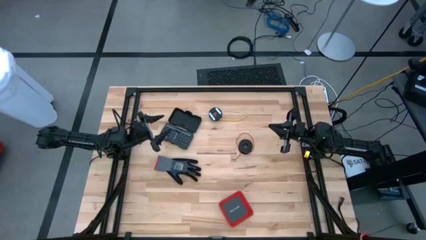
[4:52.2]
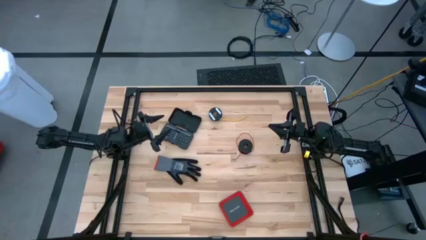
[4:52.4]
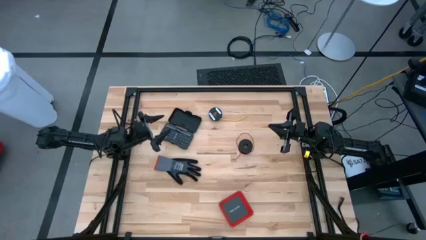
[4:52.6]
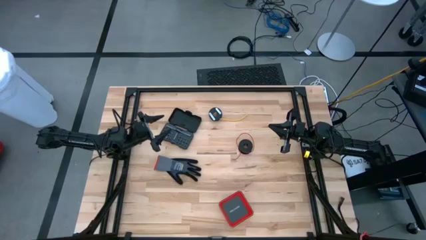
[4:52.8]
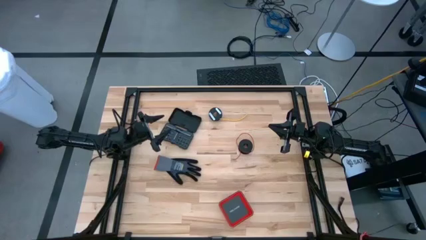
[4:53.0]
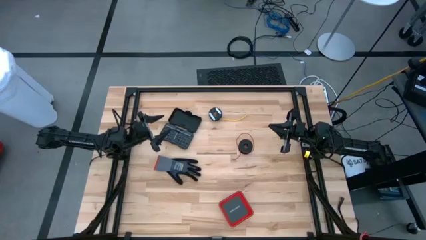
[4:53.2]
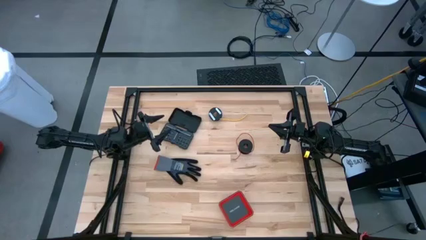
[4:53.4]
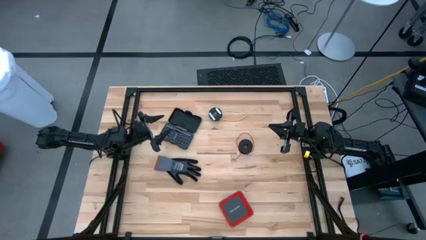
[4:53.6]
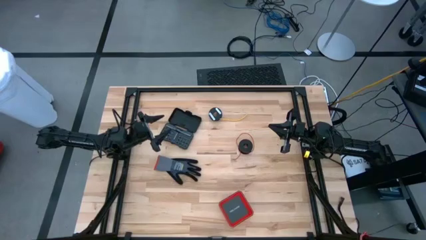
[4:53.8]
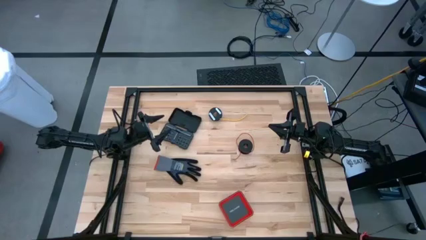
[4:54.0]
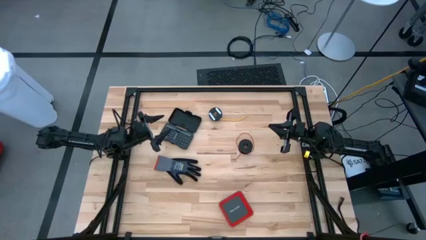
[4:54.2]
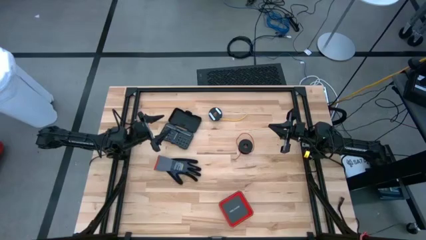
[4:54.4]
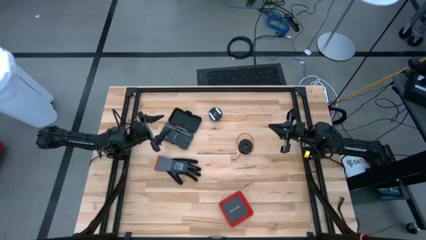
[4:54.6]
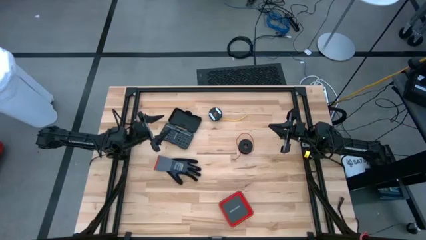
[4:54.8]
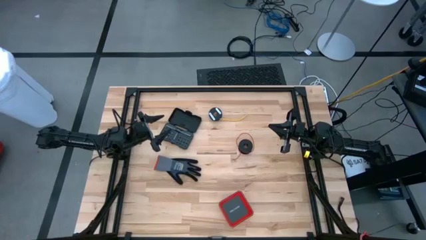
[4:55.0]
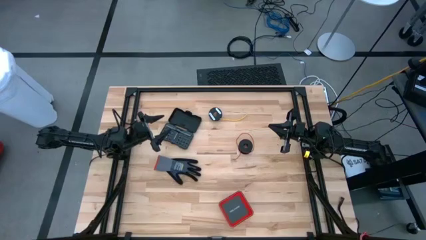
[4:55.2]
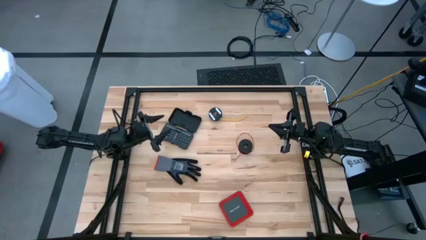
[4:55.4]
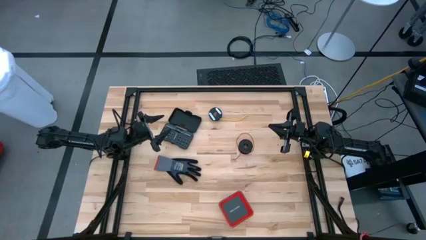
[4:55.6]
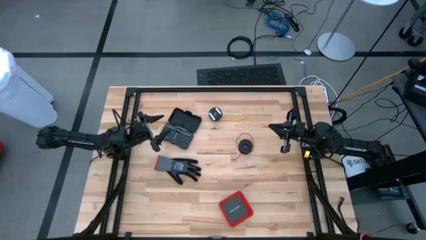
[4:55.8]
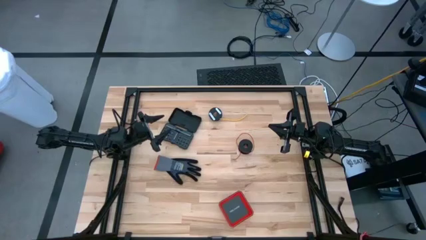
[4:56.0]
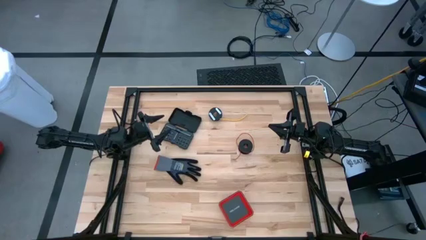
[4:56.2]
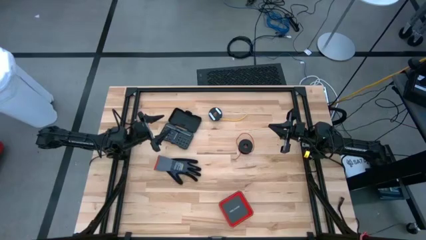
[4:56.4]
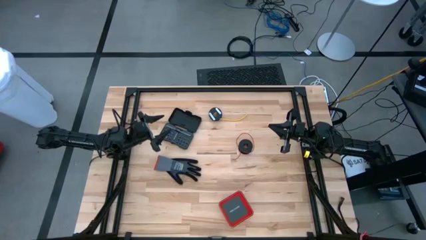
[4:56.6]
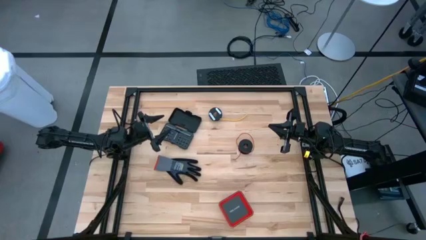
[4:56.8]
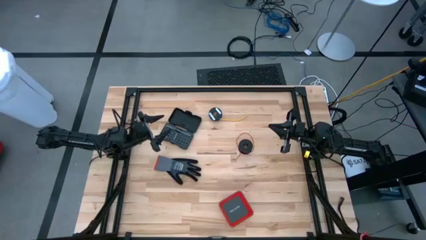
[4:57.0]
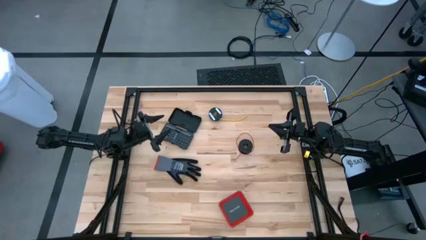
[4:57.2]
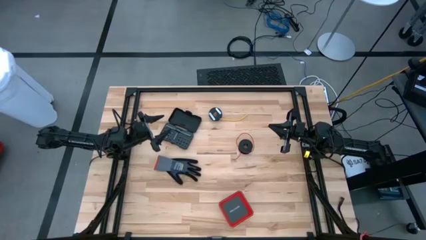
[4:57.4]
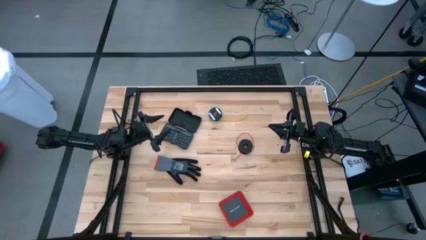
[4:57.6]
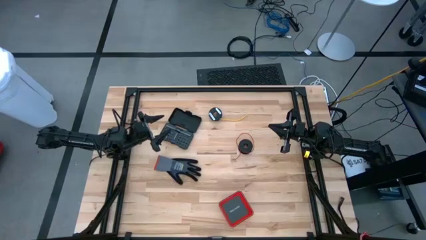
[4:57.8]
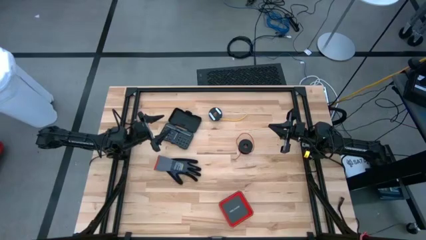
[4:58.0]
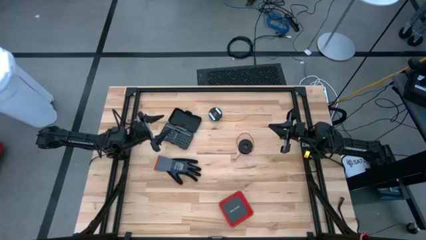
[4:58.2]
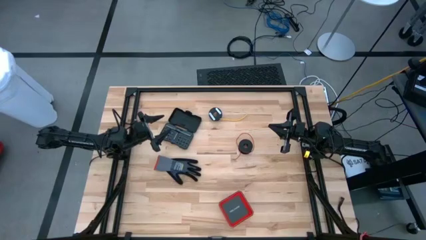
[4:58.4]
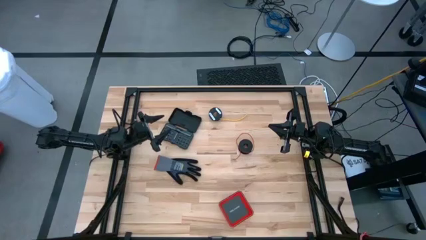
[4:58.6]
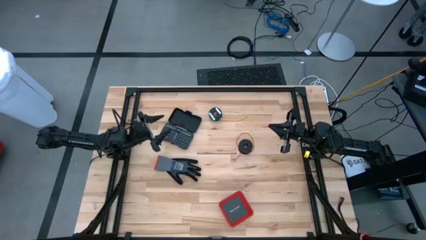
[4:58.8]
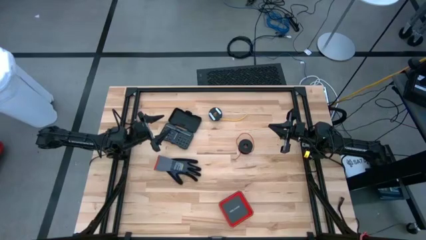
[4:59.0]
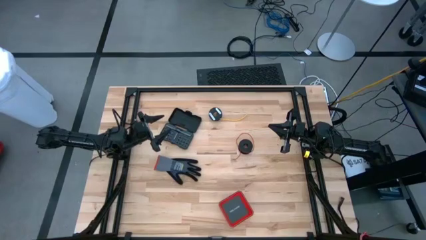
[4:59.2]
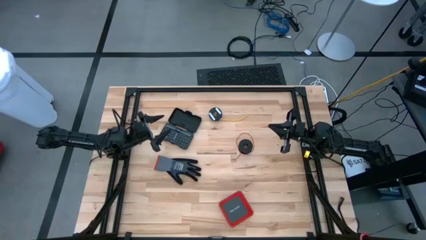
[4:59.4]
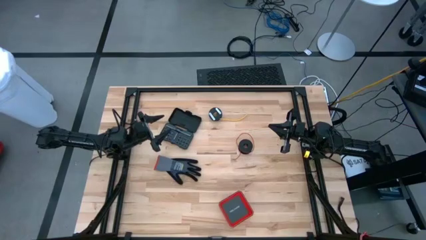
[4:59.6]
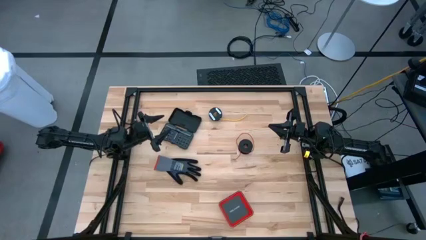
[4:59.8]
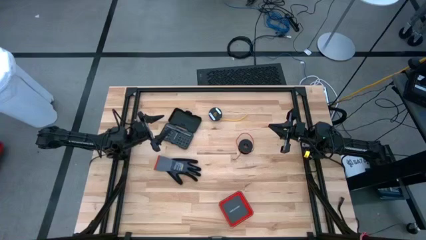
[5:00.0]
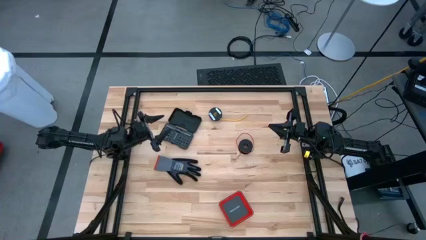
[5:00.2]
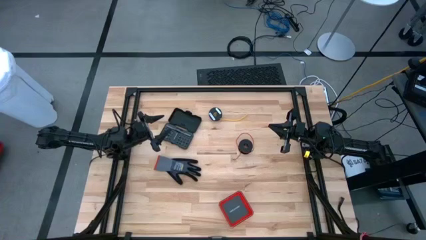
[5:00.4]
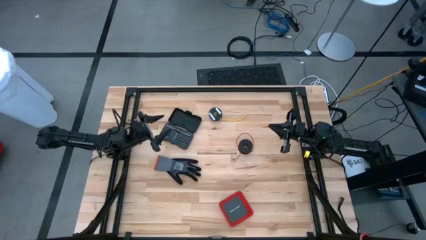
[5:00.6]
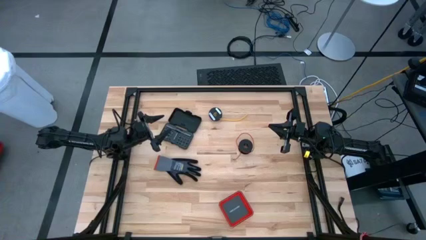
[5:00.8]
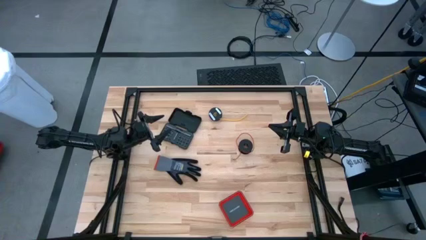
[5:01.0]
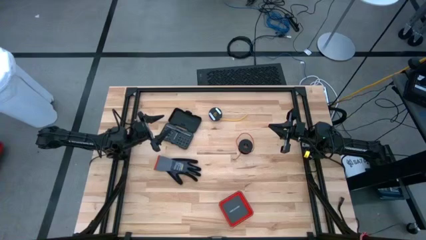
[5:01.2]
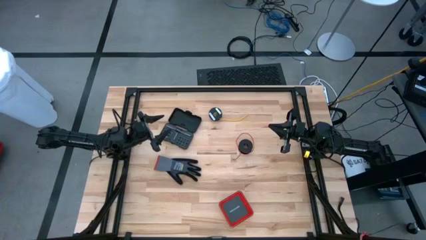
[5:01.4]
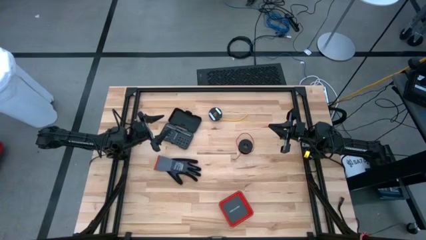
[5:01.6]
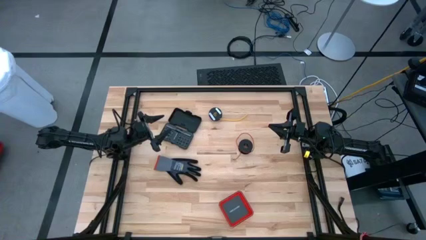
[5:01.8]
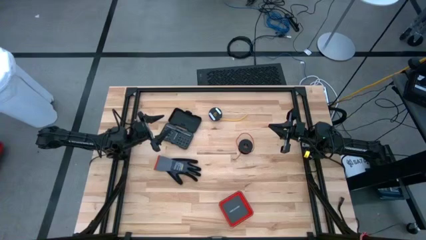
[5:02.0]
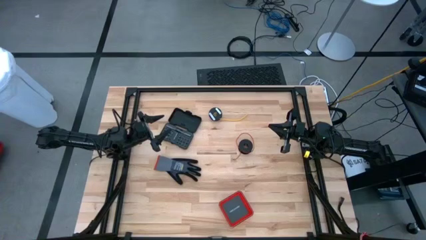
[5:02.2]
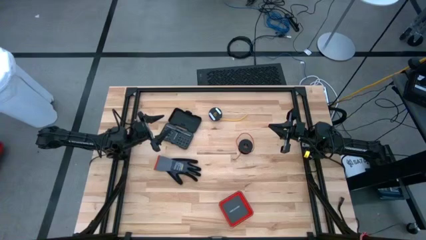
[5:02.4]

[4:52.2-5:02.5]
Task: Coil cords
Return to Home Position
